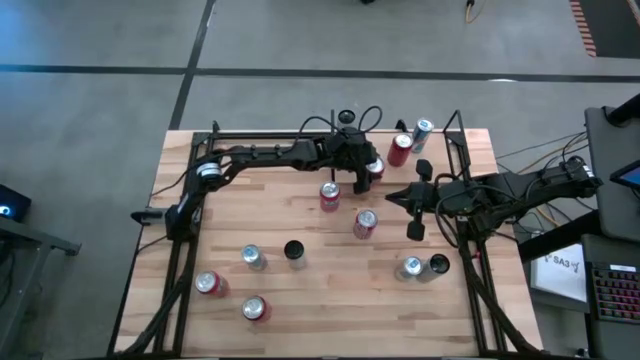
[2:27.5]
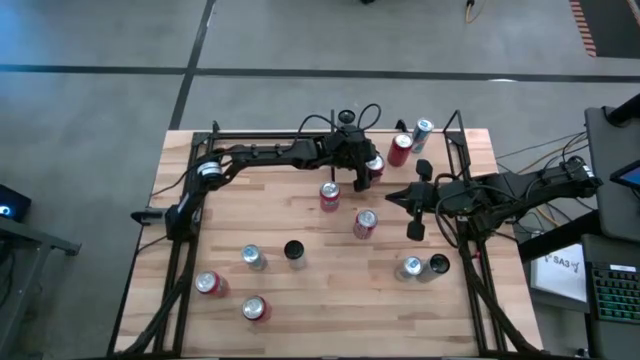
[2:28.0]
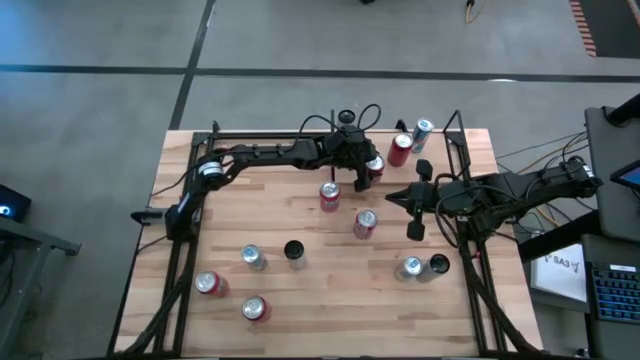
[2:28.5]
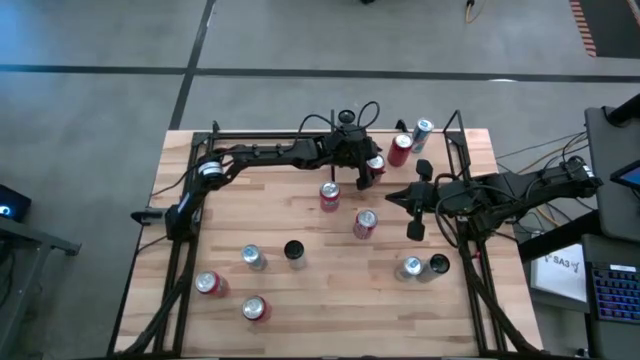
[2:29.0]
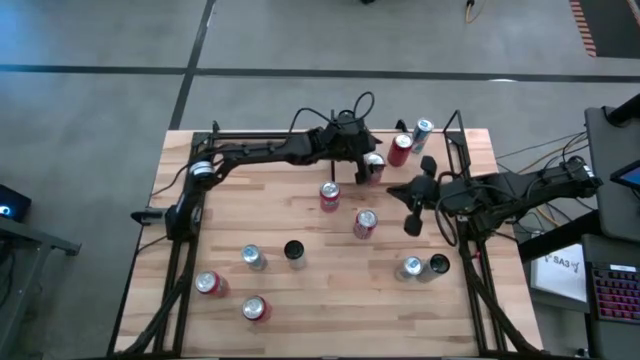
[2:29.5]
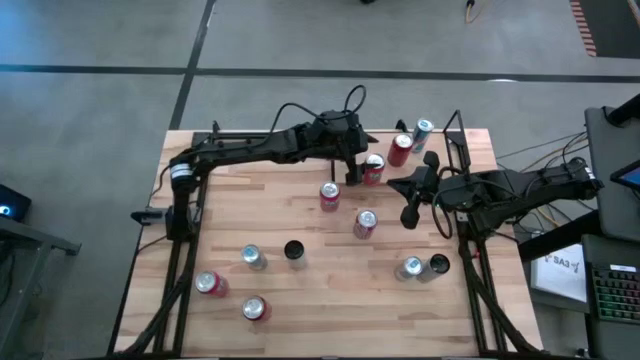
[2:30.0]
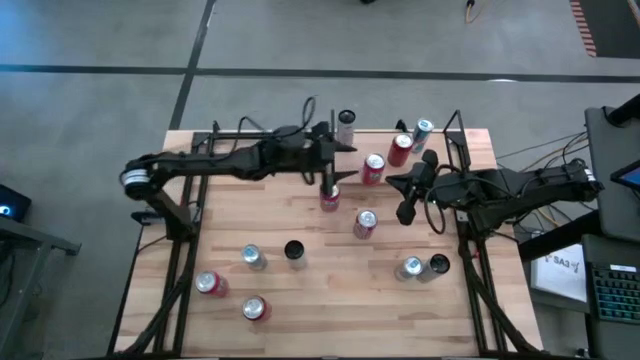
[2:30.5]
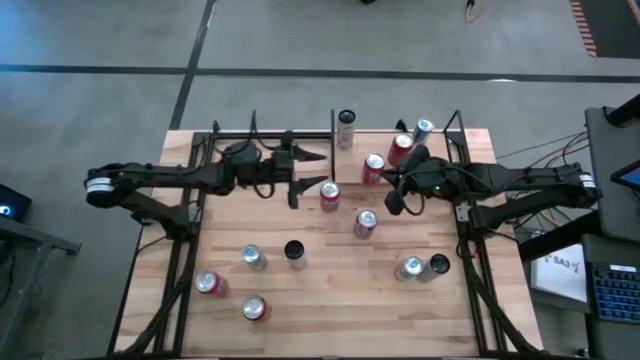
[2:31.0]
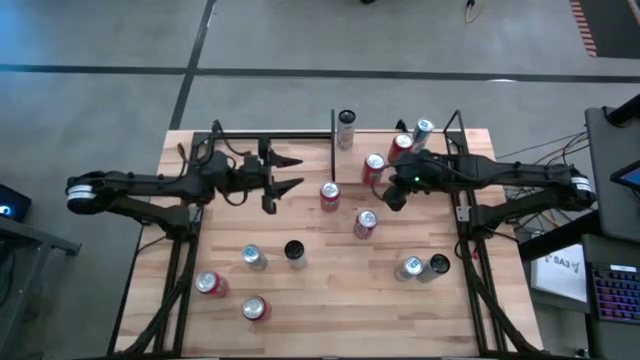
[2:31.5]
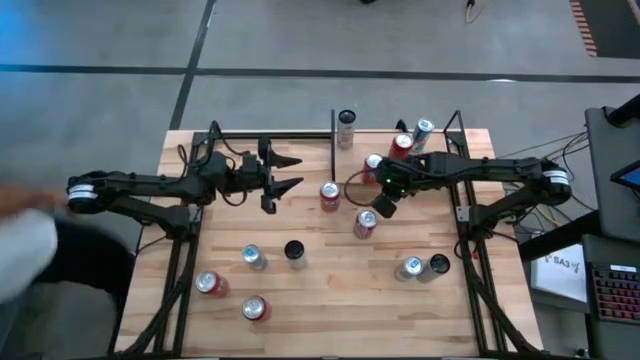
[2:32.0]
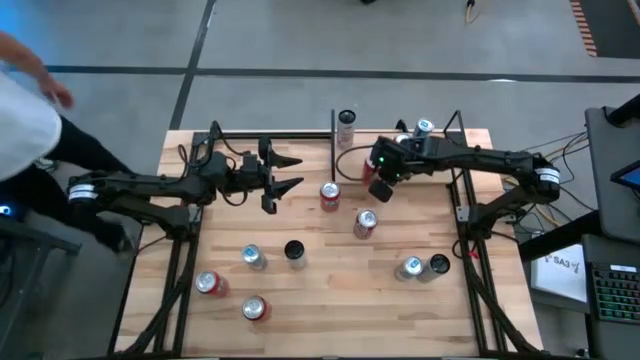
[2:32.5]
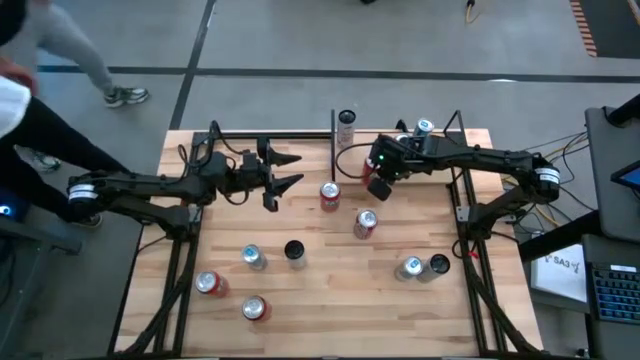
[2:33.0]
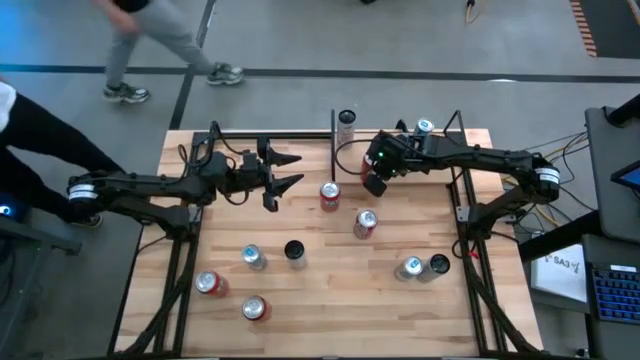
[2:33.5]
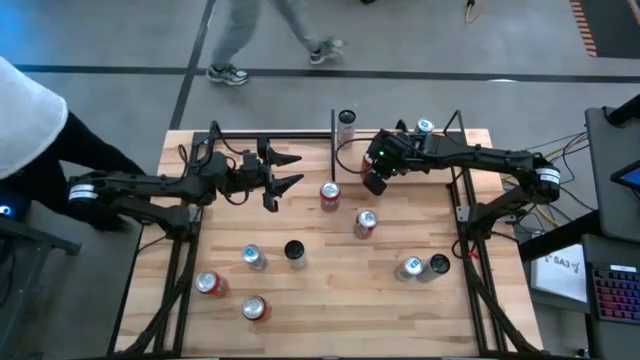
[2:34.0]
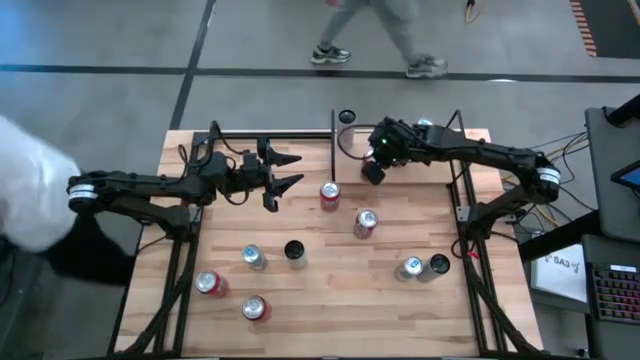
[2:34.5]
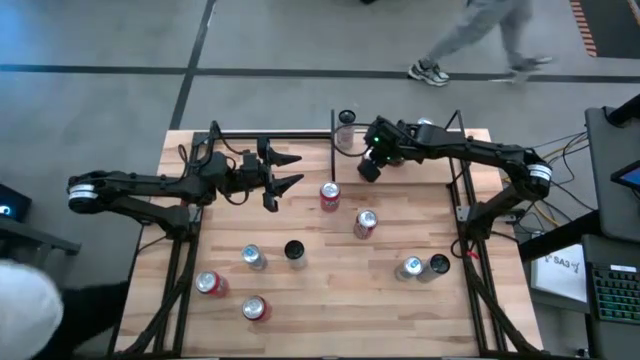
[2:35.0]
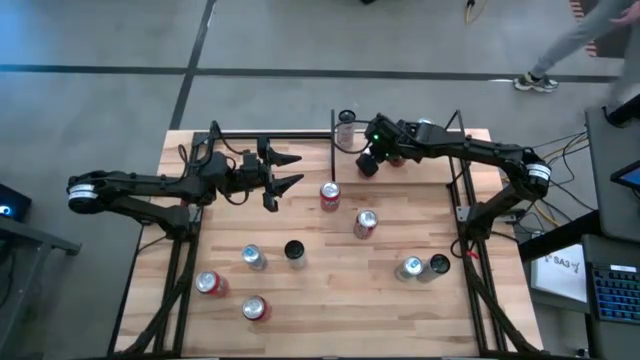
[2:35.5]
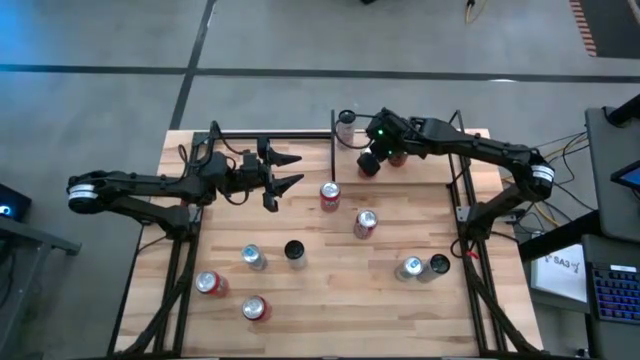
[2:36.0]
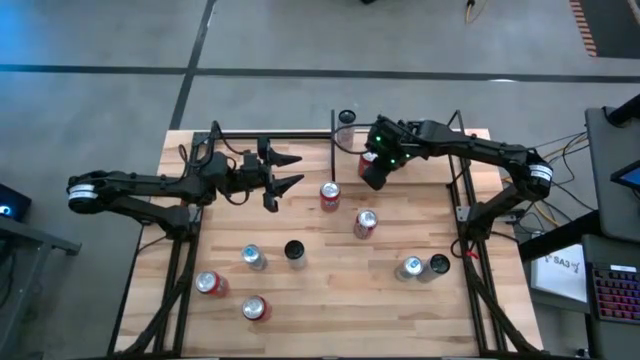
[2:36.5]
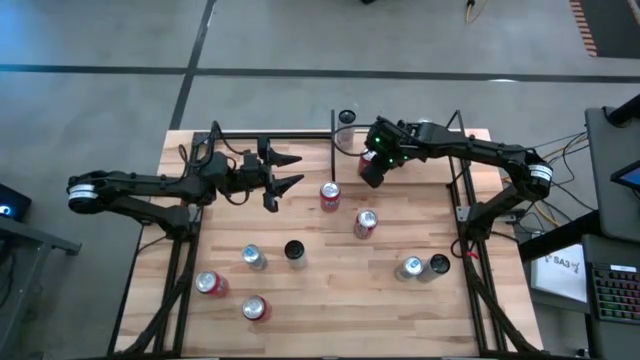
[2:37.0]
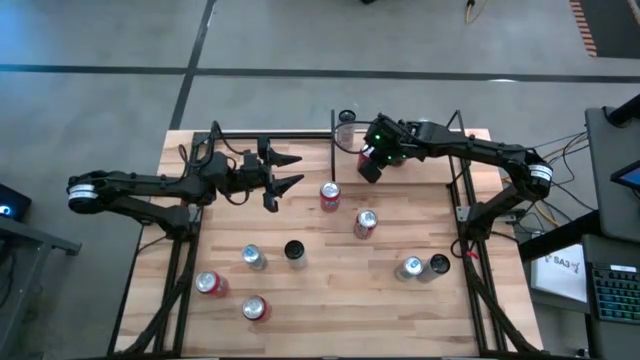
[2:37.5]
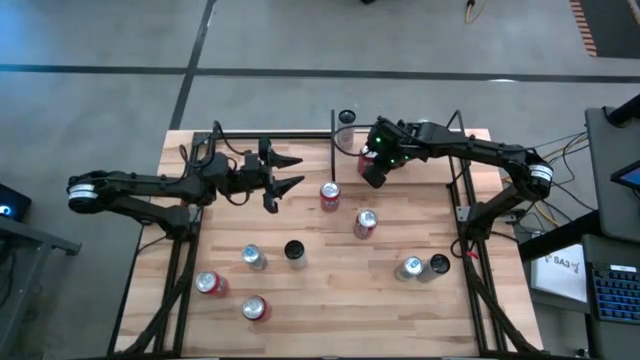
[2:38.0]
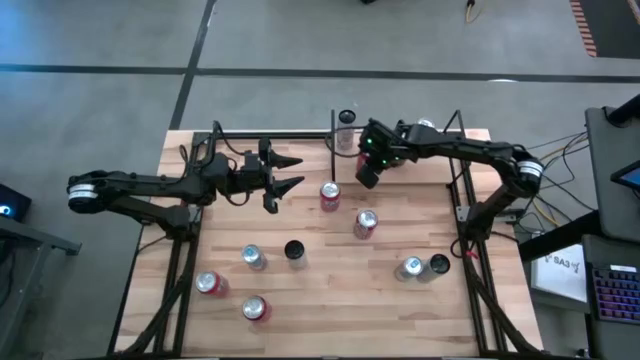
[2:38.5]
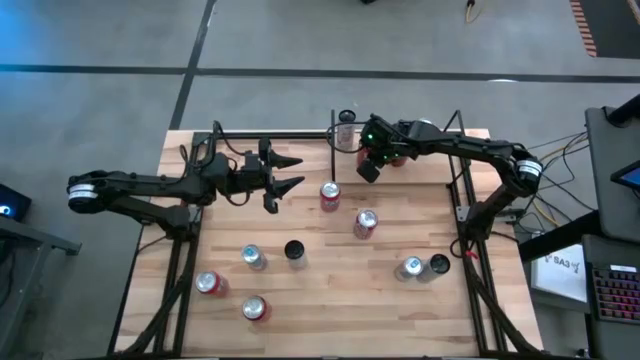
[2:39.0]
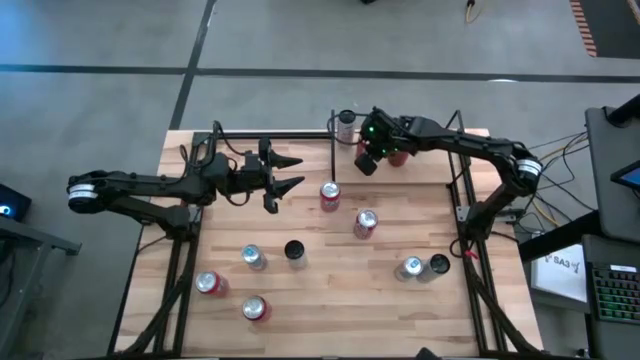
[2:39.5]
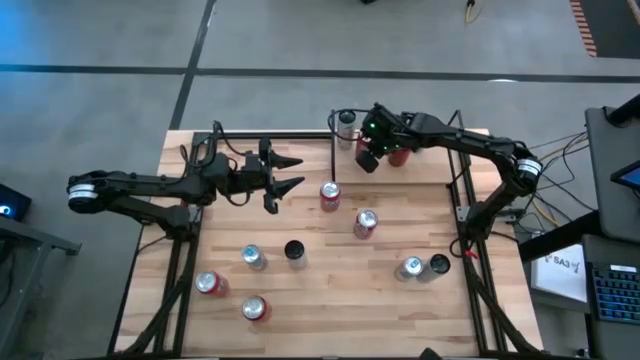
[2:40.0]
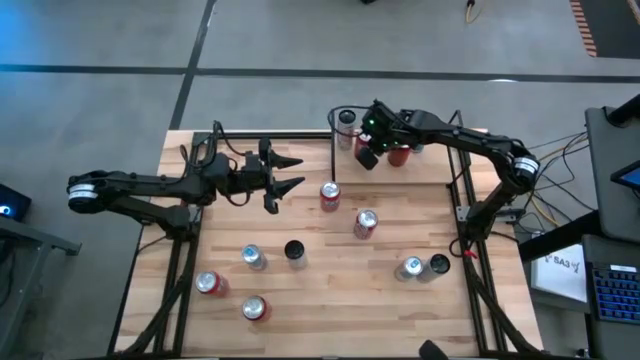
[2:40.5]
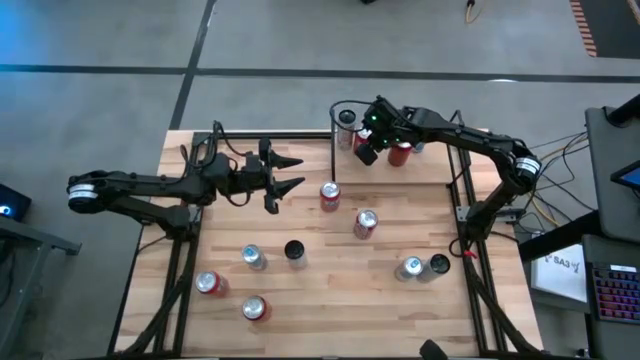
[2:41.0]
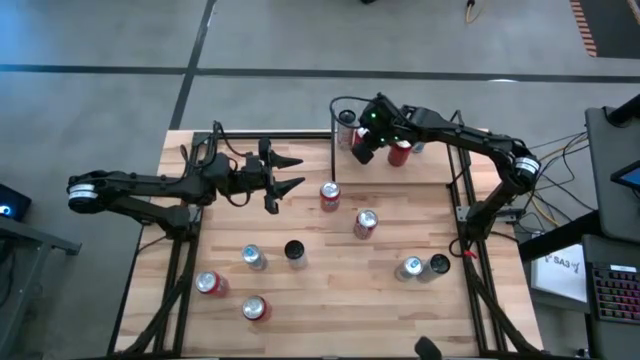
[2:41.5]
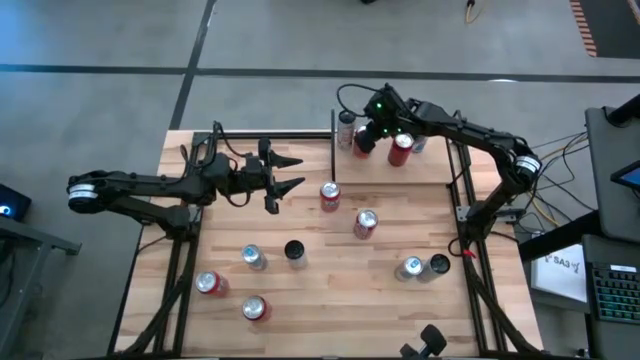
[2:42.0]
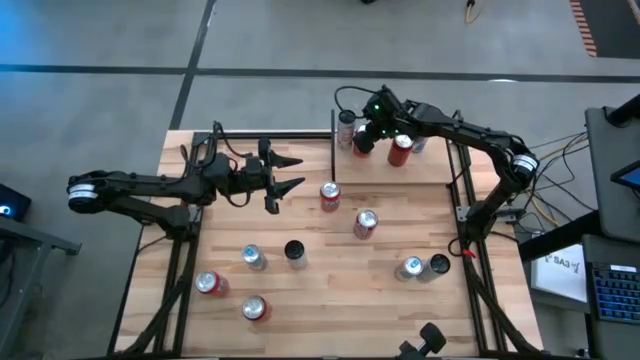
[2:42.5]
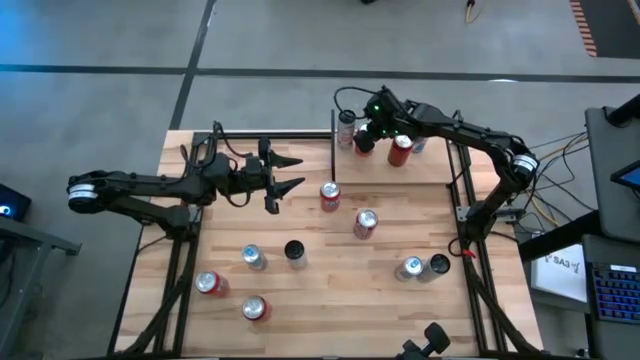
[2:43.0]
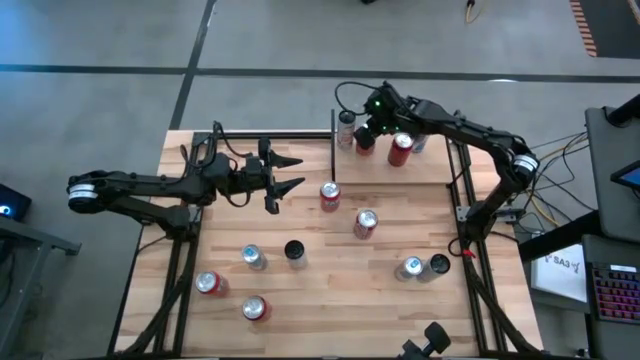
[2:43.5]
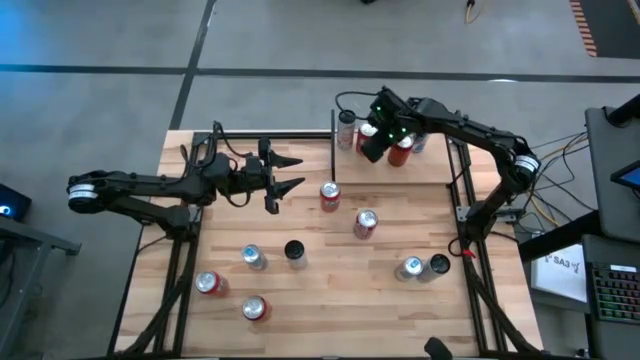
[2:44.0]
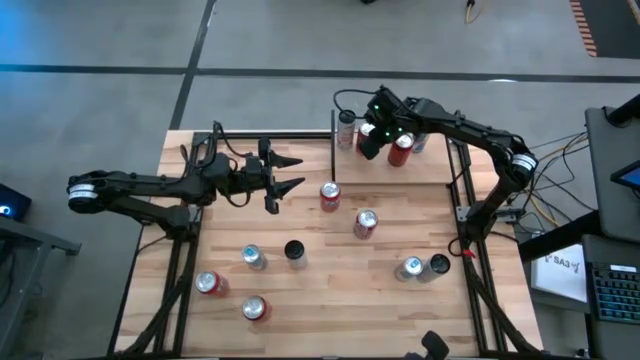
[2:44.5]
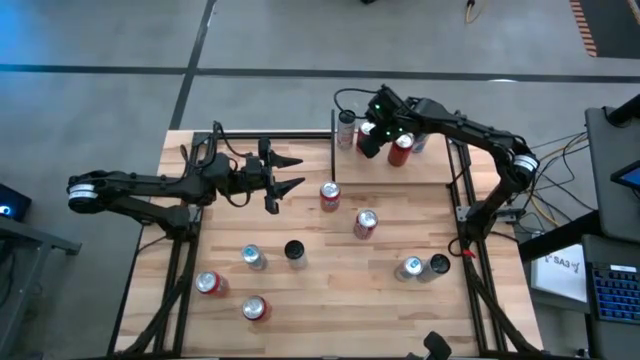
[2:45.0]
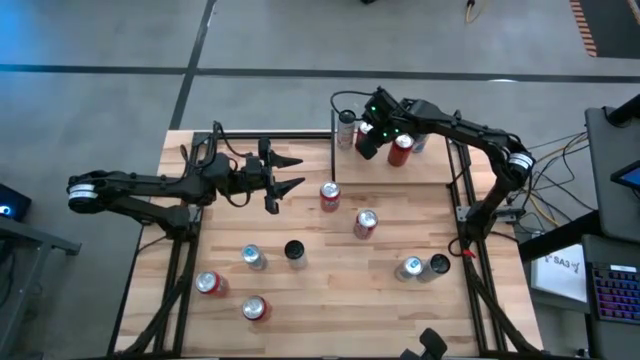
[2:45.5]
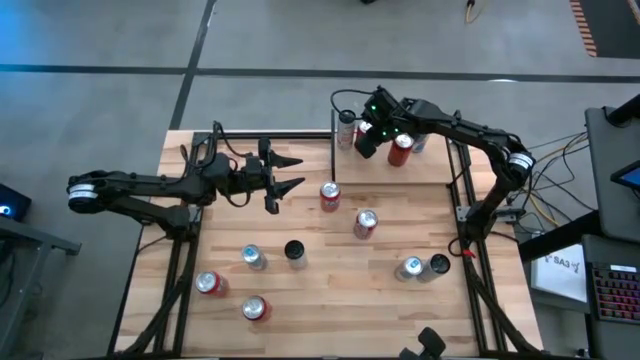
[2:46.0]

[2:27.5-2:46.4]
Task: Place canned beverage on shelf
Put the bottom right orange soda can on the shelf

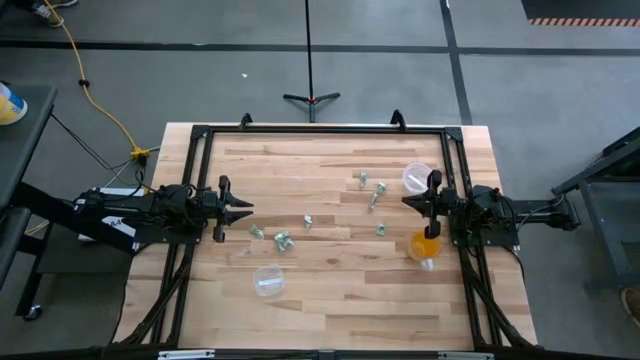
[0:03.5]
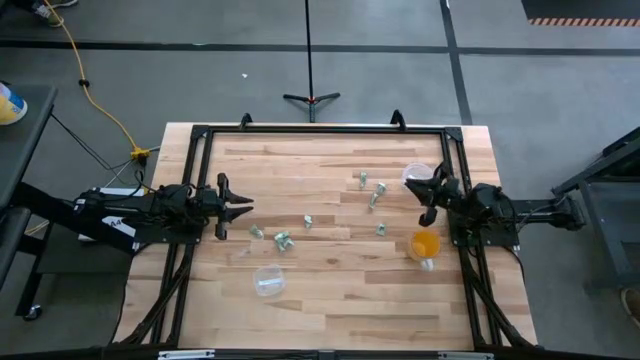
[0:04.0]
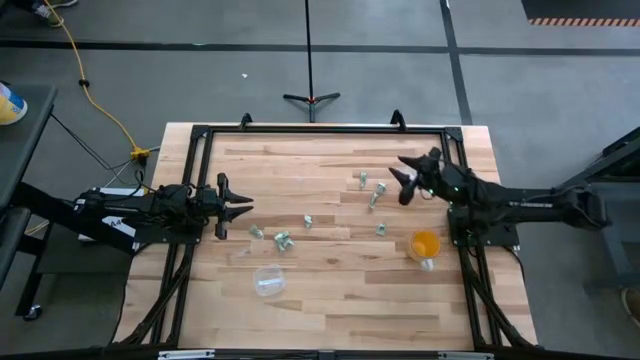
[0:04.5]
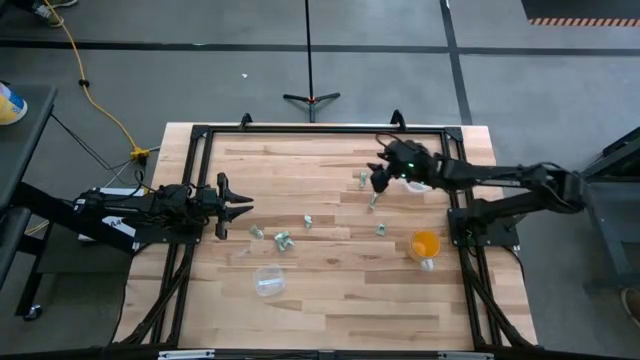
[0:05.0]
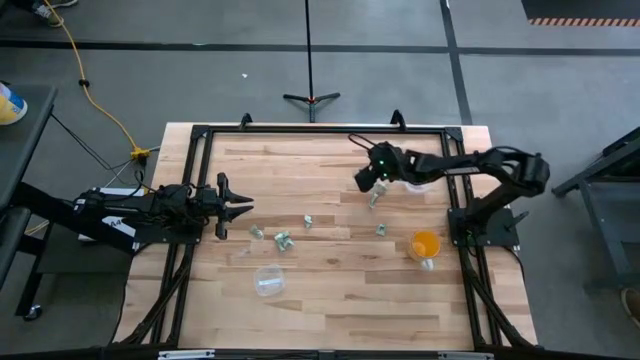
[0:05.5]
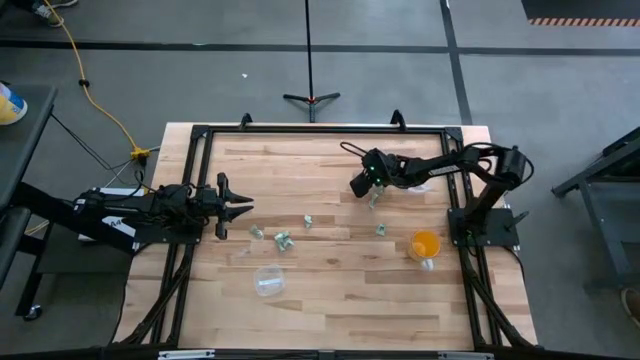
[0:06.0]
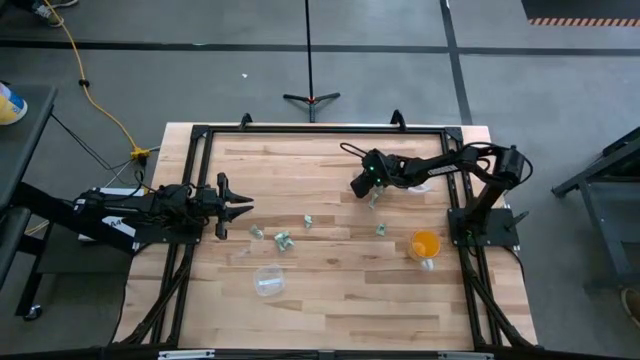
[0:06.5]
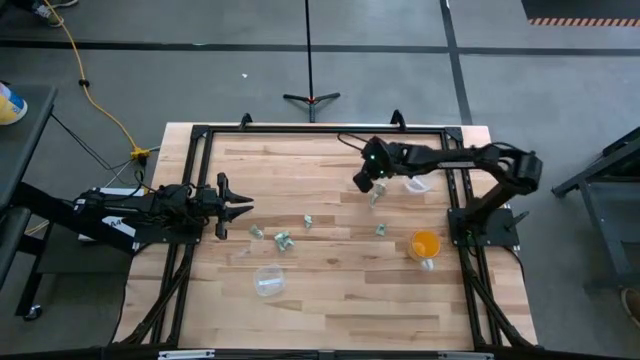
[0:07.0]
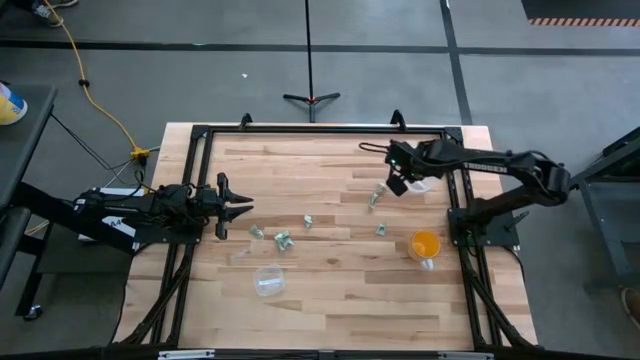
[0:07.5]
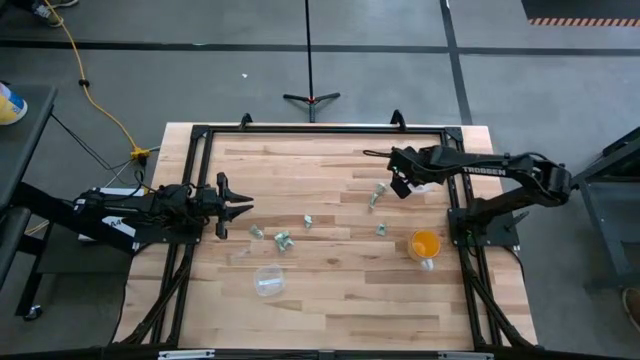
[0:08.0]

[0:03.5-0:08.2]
Task: Pick and place Stevia / Truvia into bins
Put the stevia packet into the circular container
